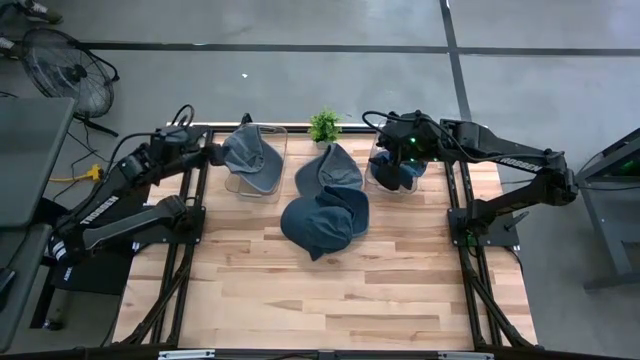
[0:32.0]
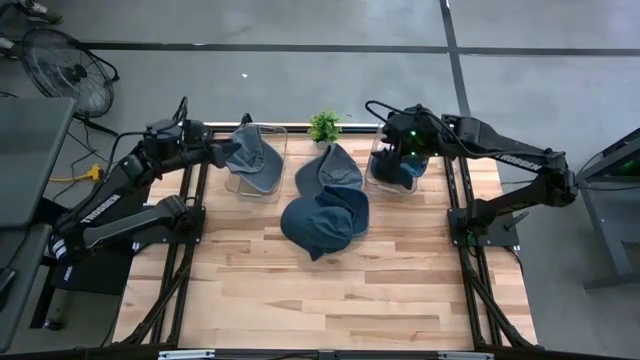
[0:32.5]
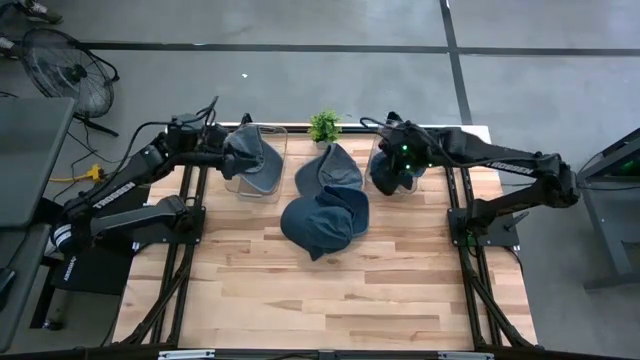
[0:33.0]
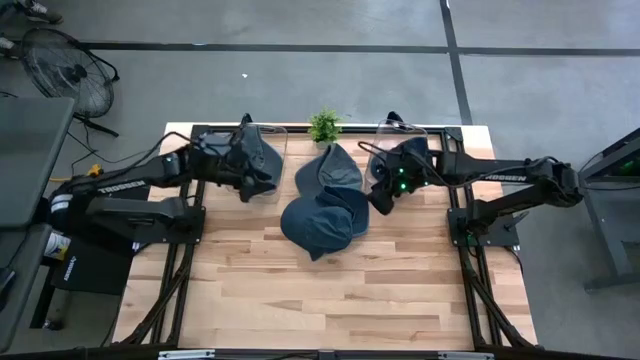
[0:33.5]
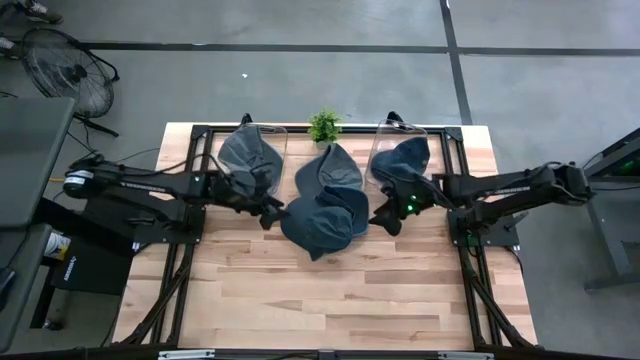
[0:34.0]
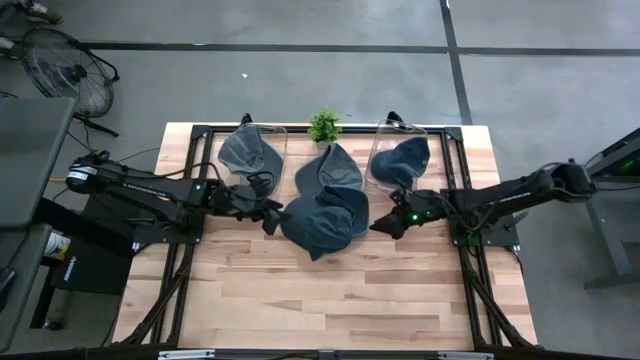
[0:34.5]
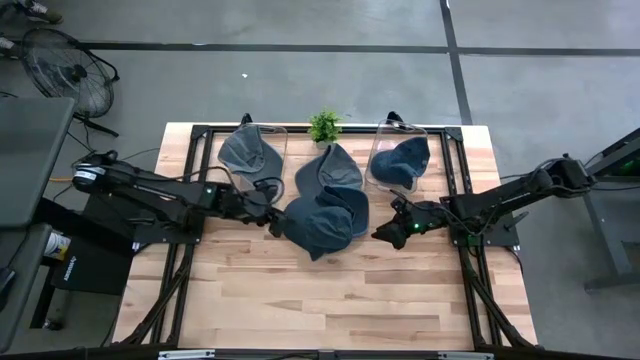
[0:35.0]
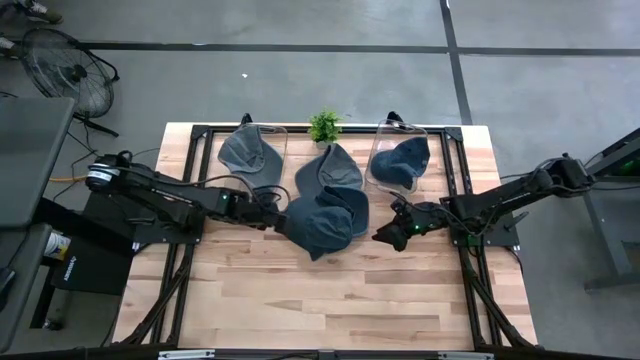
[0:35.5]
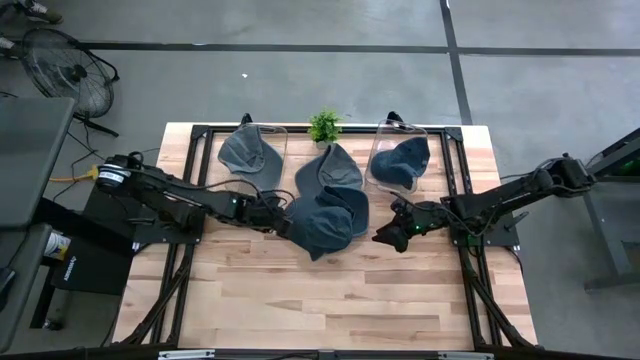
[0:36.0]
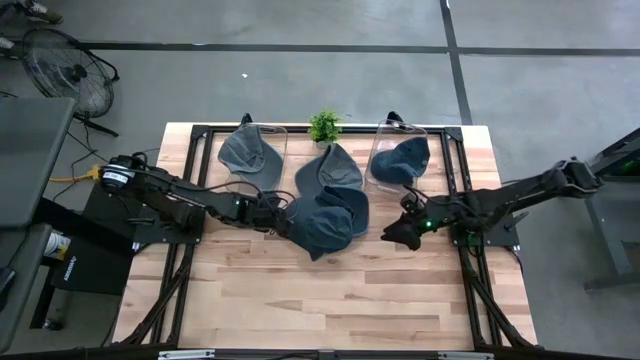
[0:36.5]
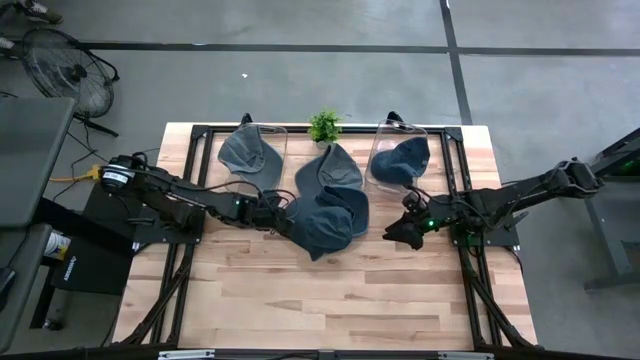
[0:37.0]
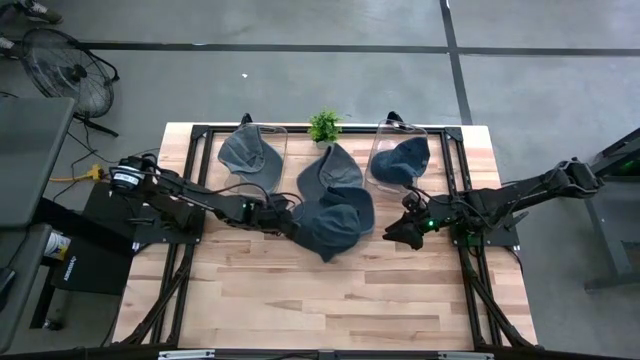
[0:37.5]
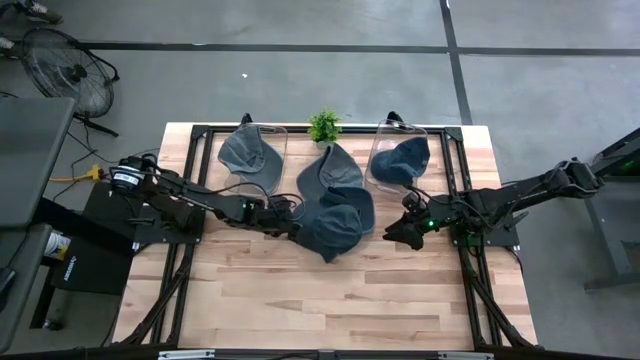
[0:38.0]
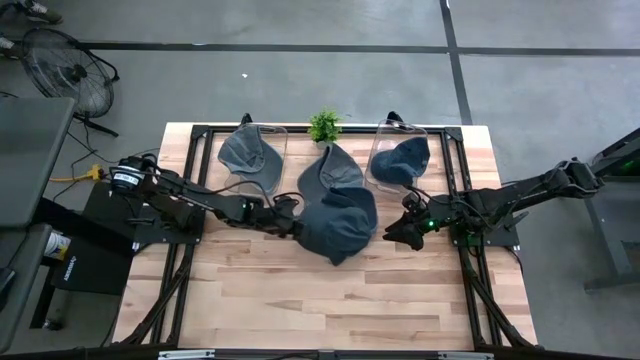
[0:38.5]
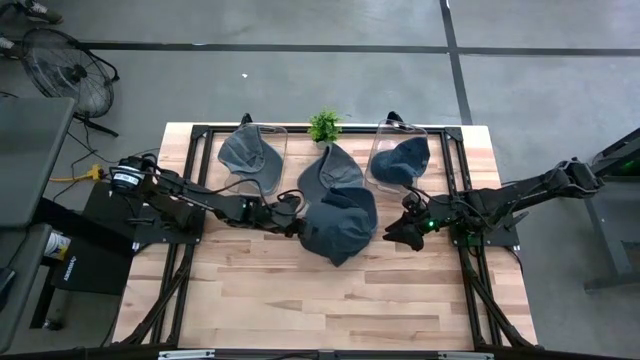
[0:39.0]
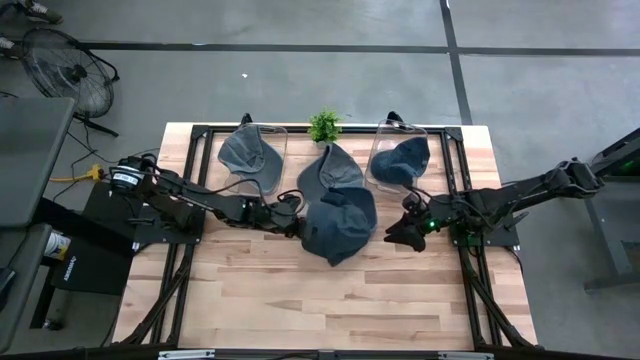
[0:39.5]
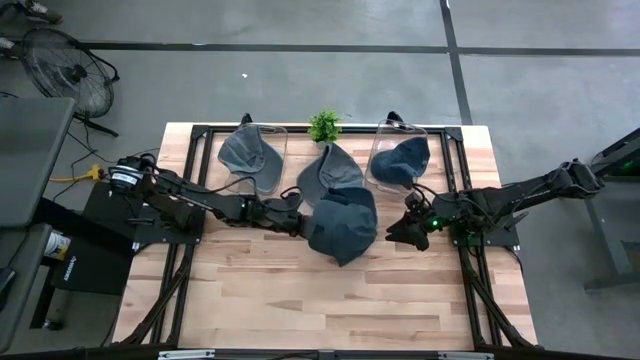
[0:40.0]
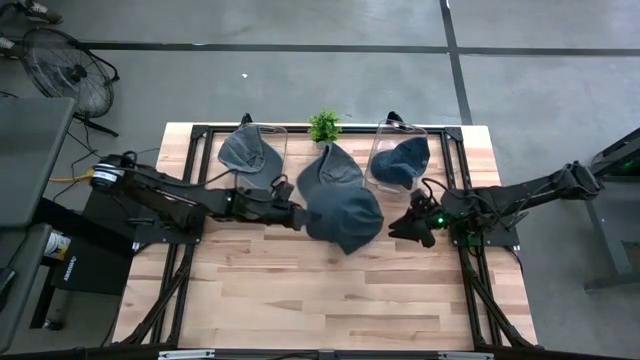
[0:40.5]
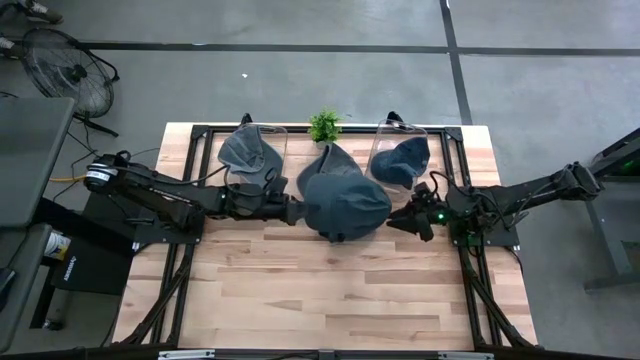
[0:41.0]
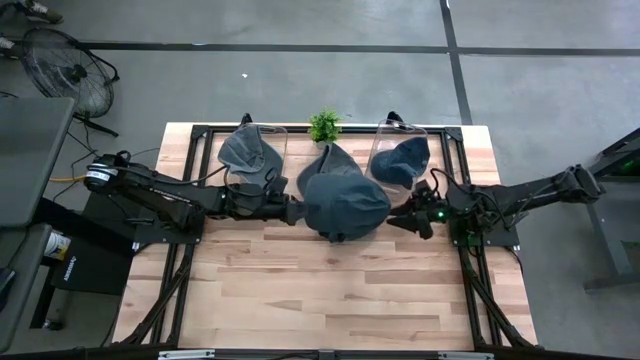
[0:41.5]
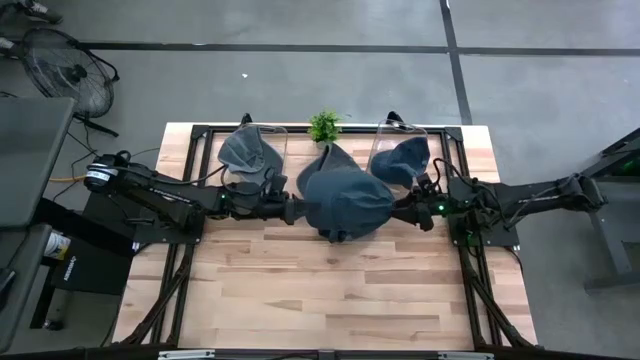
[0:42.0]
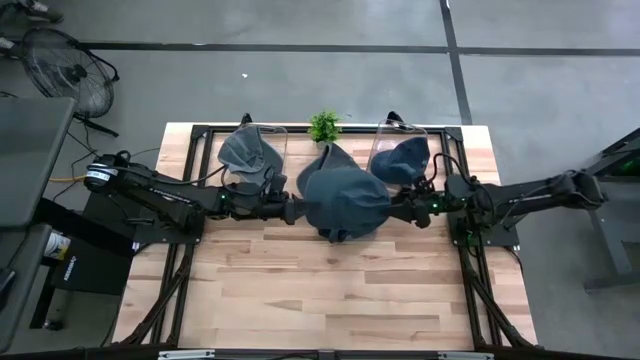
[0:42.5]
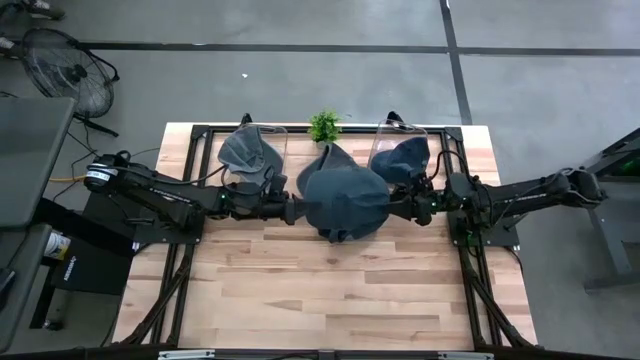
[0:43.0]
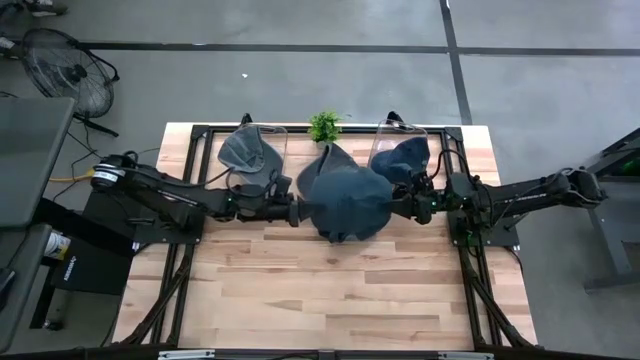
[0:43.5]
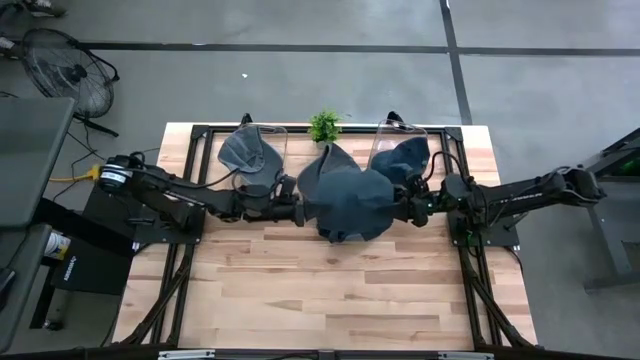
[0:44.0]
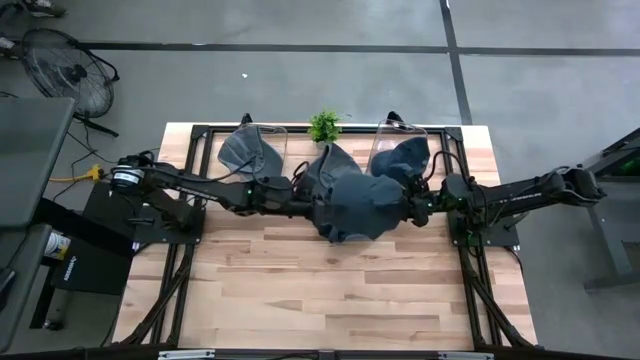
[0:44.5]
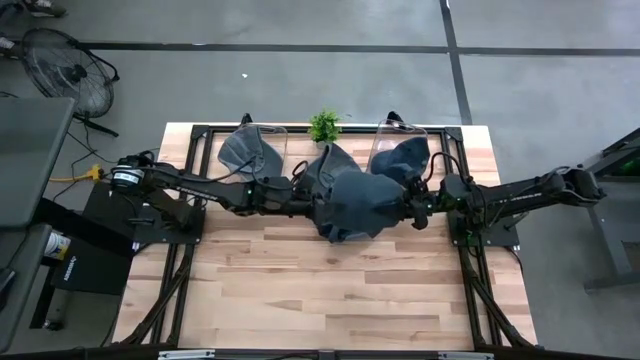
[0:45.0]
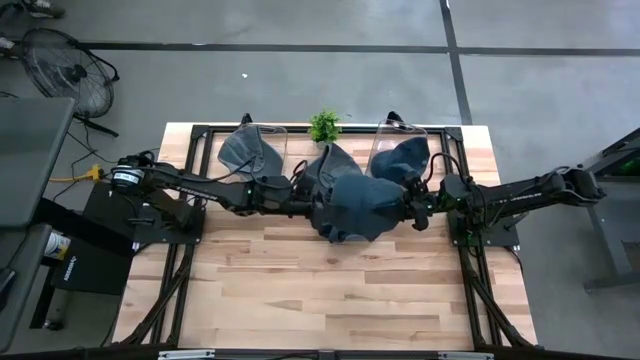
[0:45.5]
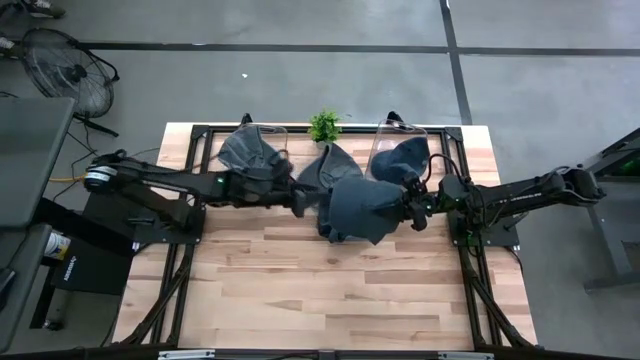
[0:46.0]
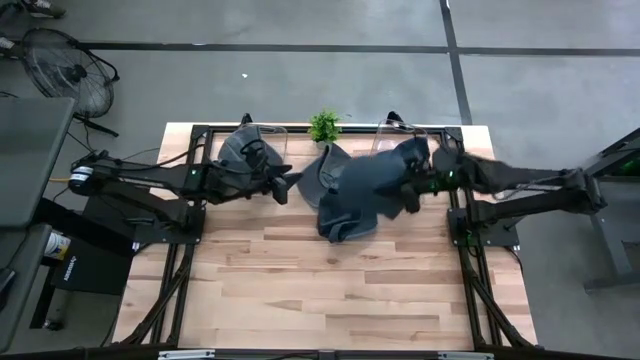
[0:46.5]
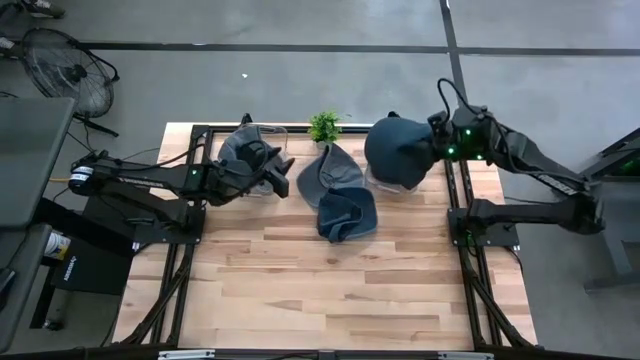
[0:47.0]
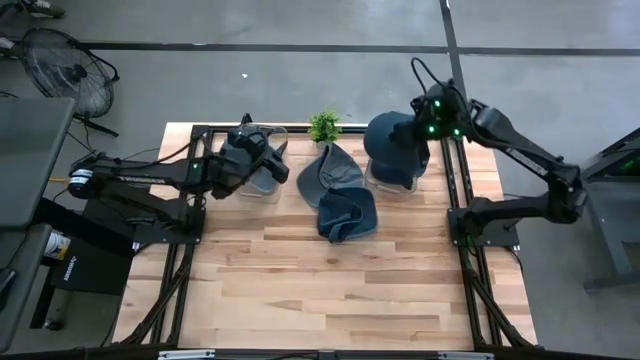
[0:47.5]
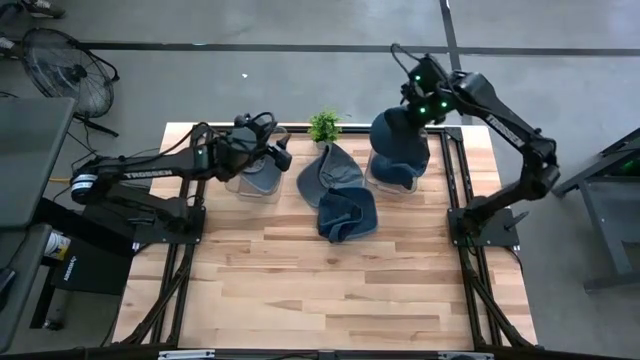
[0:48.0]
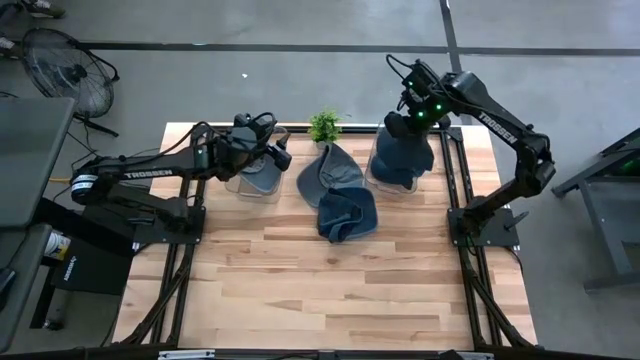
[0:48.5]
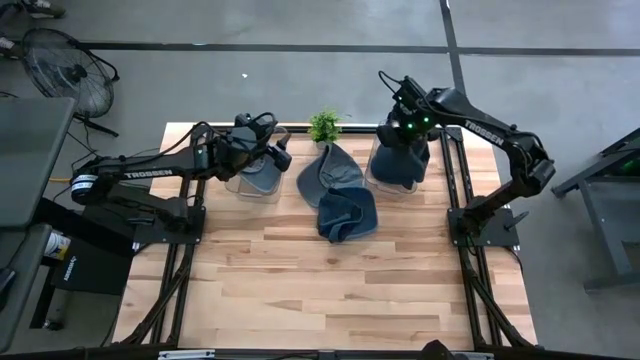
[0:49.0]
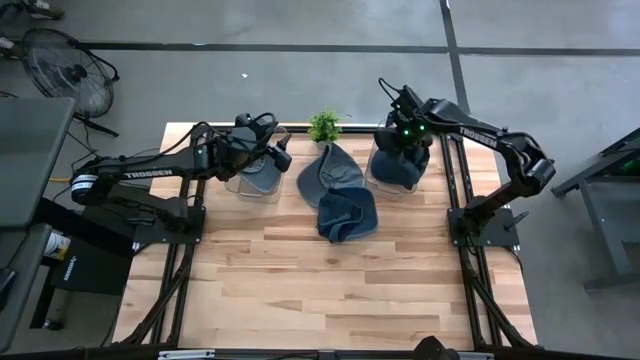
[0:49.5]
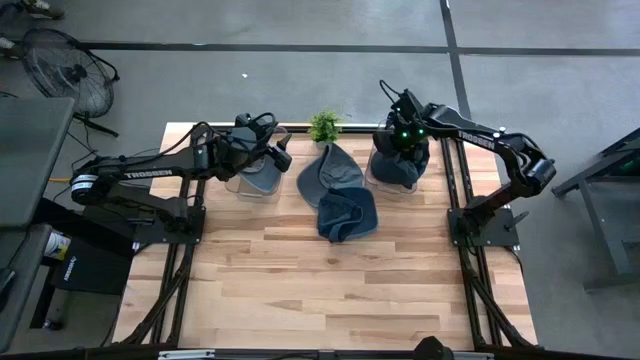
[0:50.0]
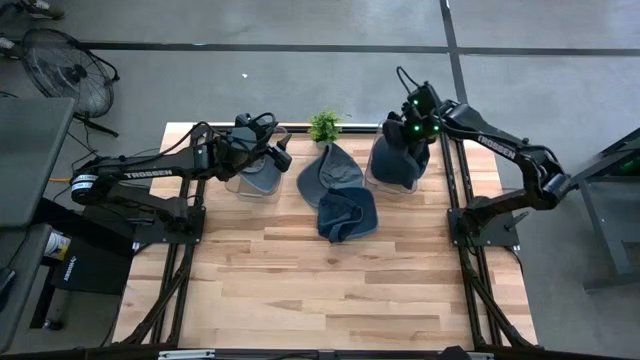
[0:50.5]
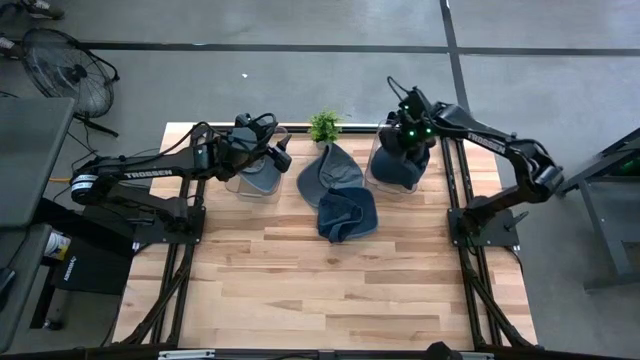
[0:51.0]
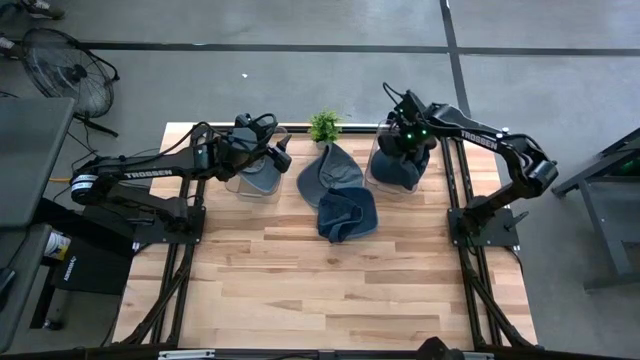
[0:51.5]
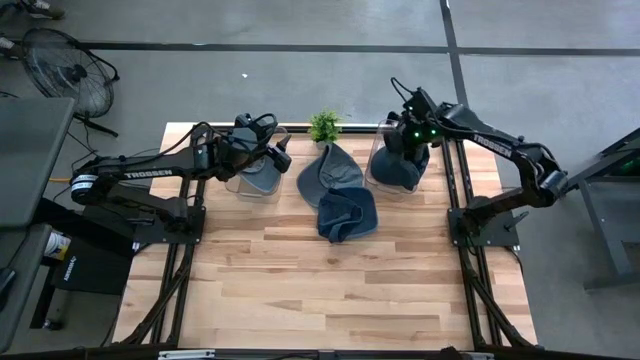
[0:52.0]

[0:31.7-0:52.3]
Task: Pick & Place hat
Put the bottom blue cap into the right transparent bin
